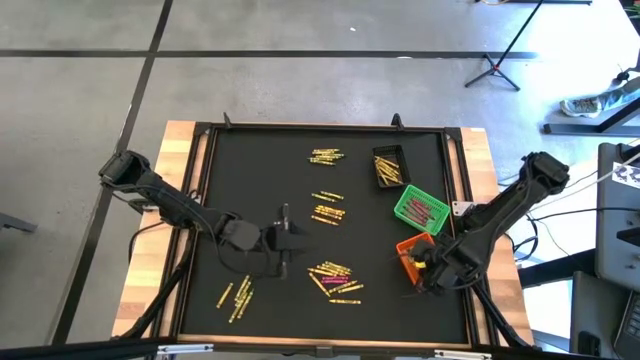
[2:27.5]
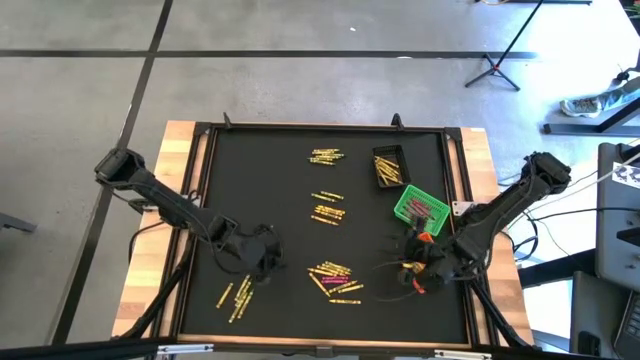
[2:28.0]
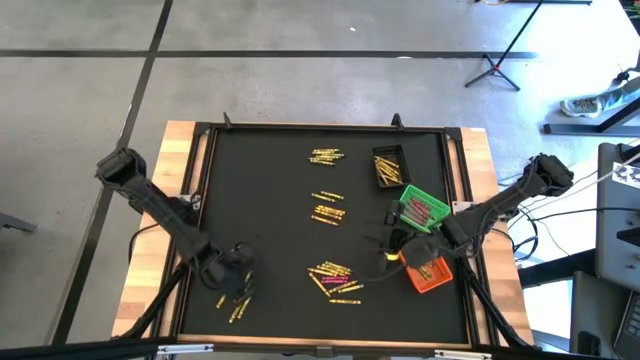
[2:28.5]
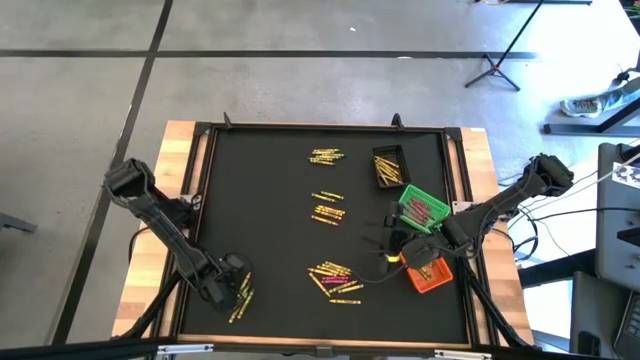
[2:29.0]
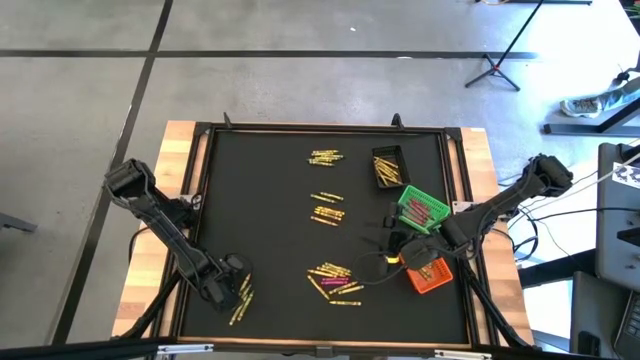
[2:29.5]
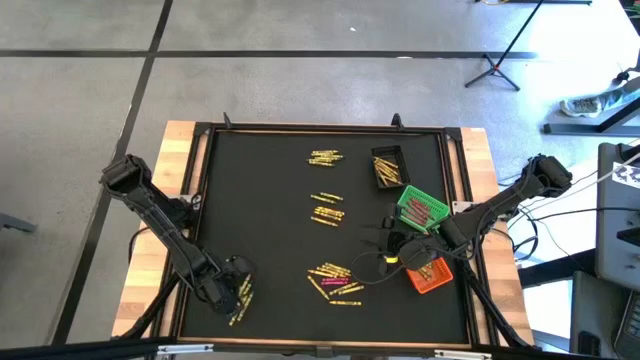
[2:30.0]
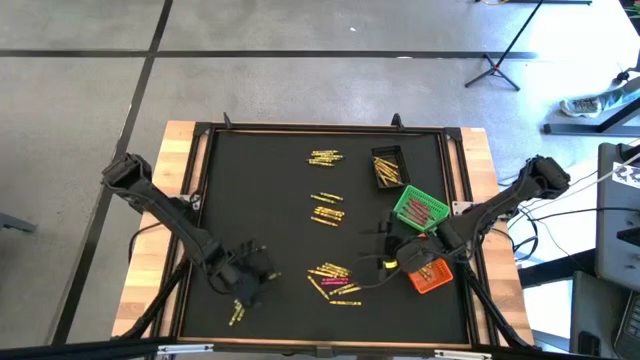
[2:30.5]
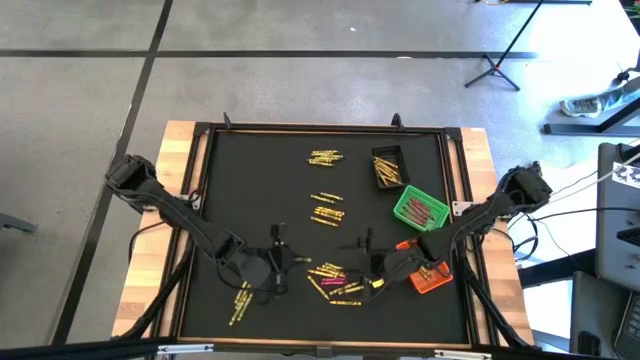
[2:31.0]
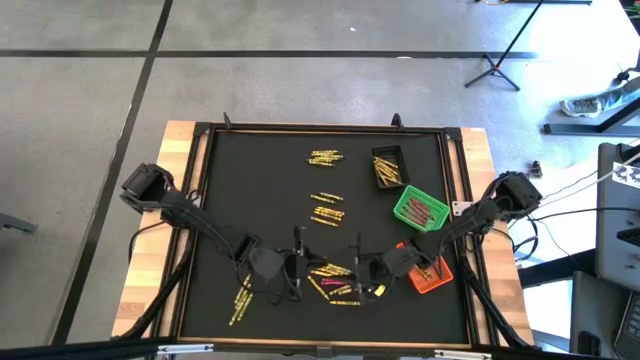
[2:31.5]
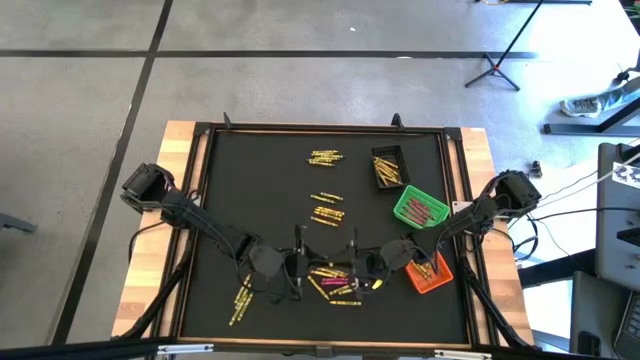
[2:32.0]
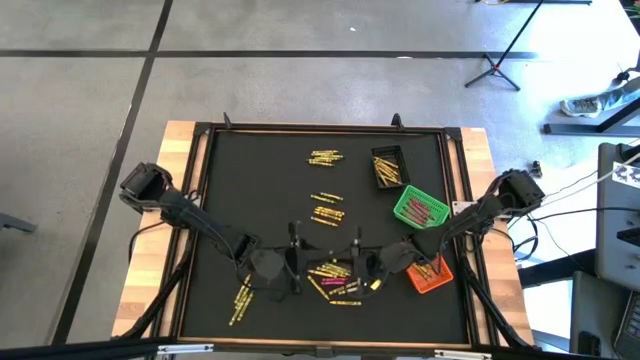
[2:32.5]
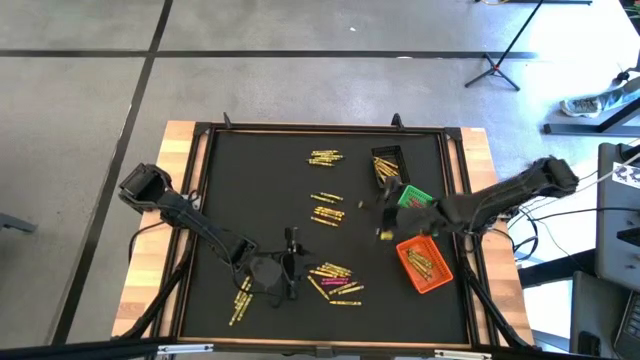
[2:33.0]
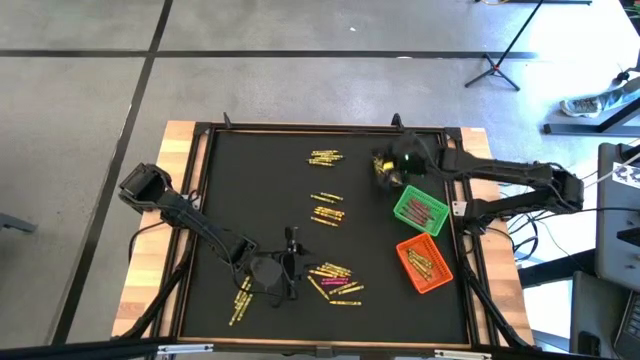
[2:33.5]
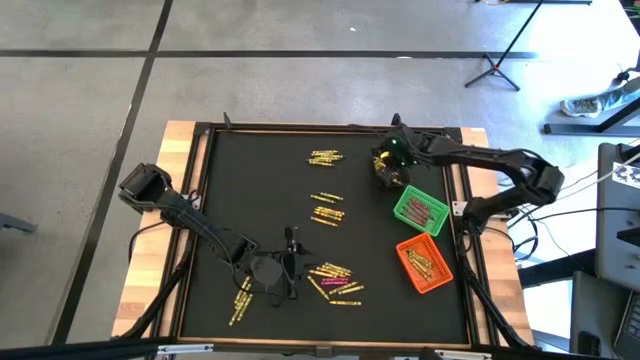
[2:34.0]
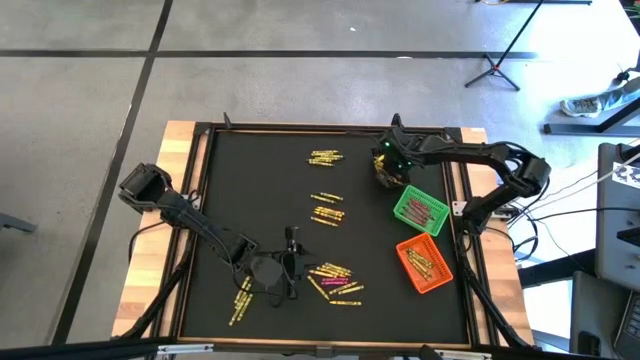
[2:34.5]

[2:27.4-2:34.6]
Task: Sort crayons
Put the yellow crayon into the black basket

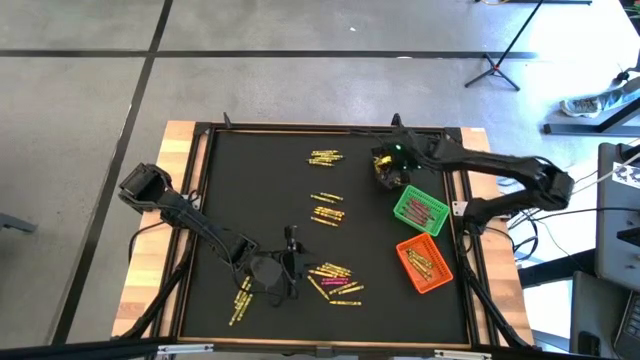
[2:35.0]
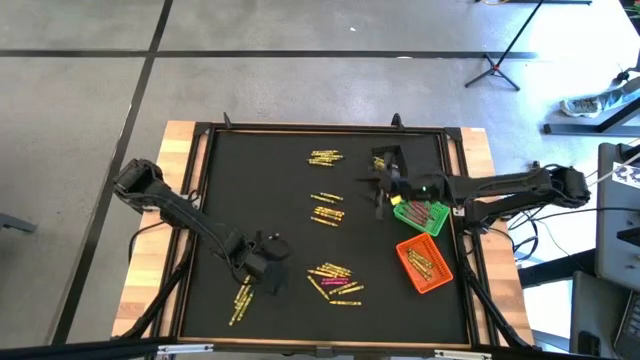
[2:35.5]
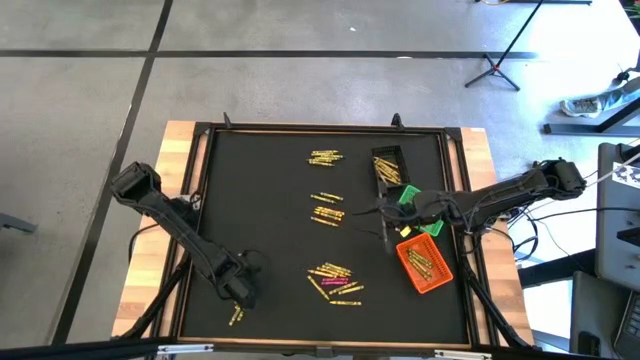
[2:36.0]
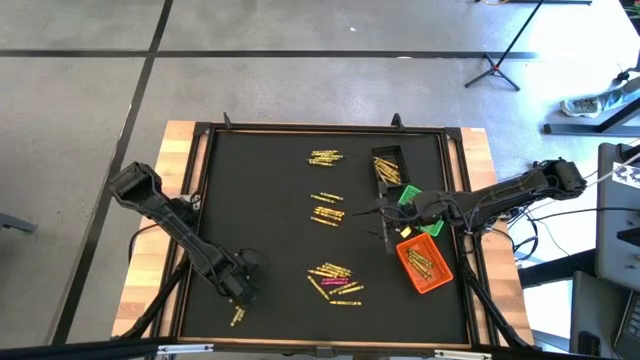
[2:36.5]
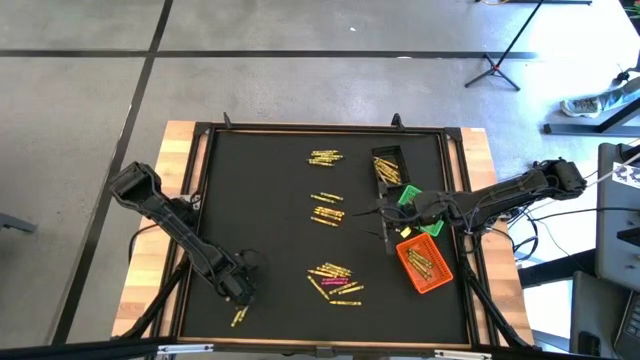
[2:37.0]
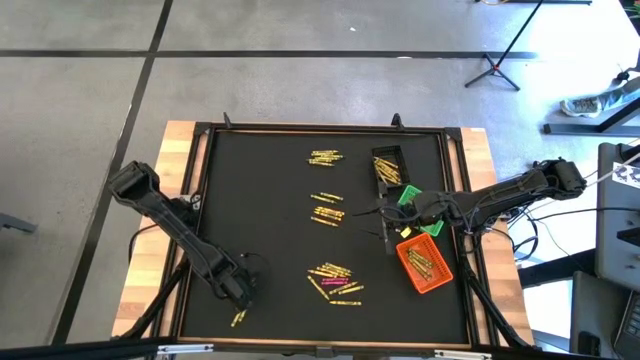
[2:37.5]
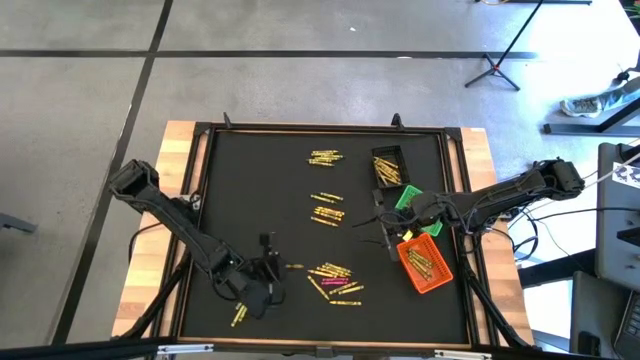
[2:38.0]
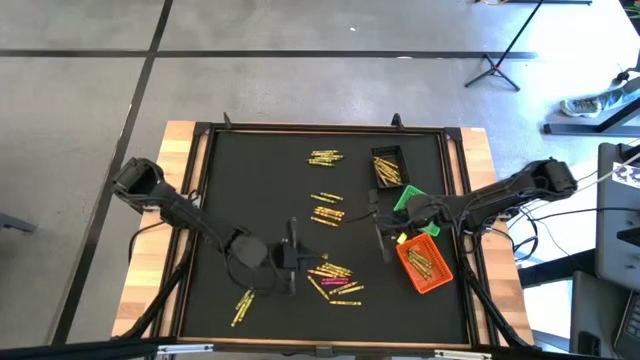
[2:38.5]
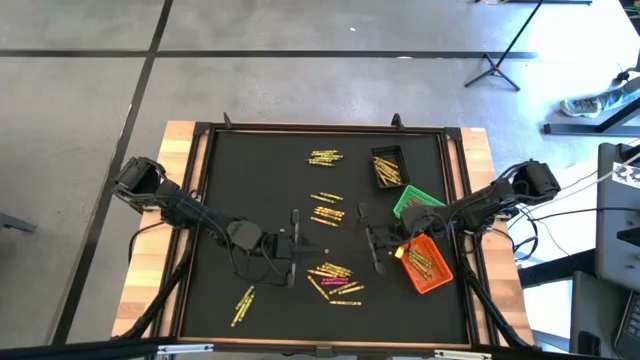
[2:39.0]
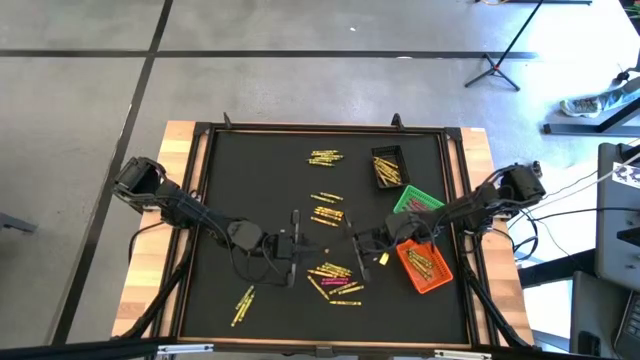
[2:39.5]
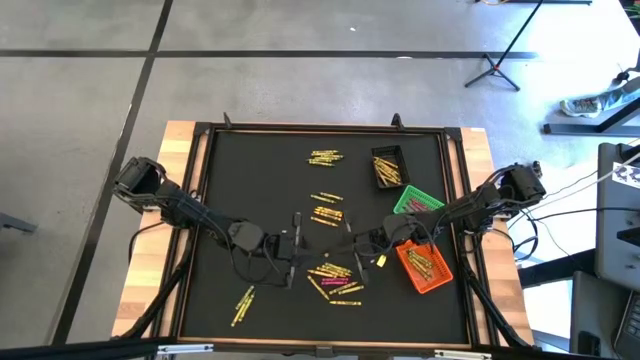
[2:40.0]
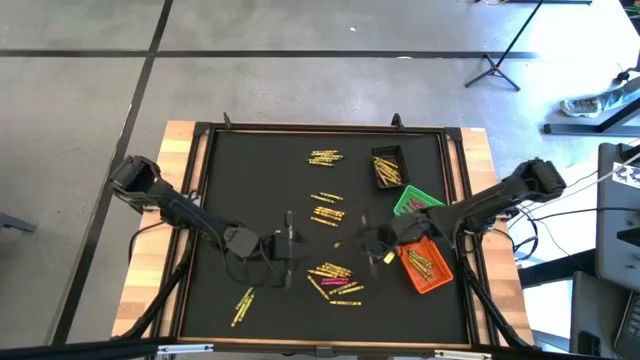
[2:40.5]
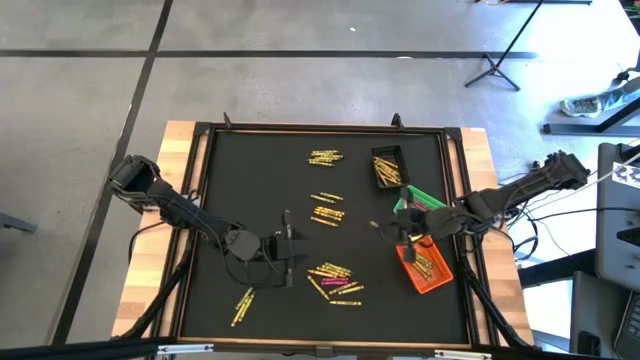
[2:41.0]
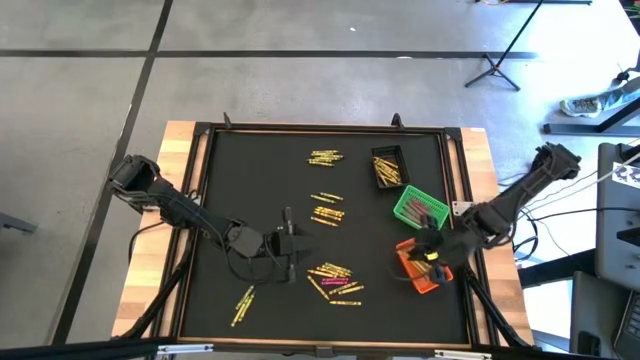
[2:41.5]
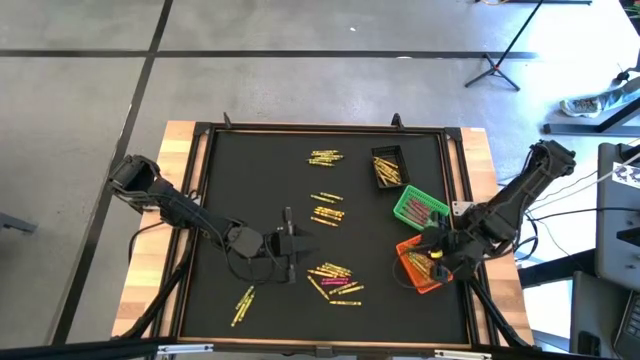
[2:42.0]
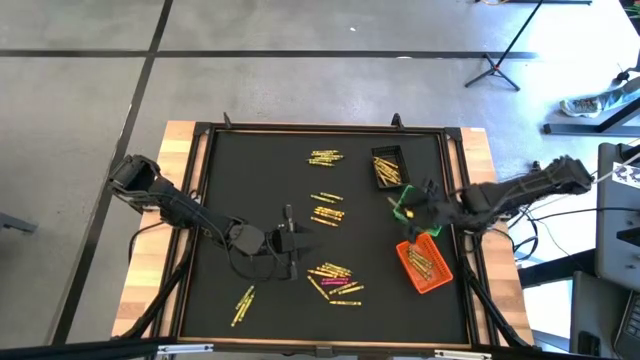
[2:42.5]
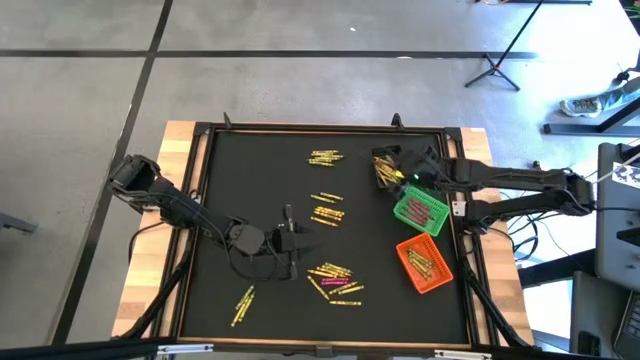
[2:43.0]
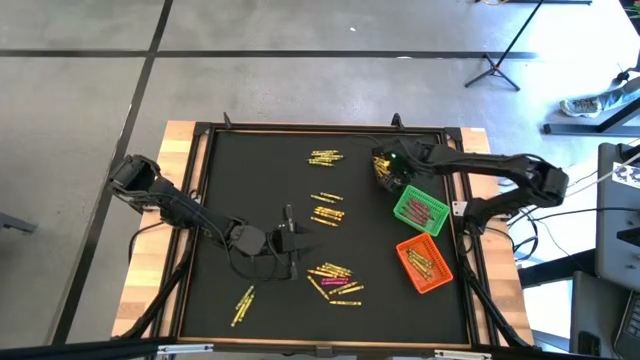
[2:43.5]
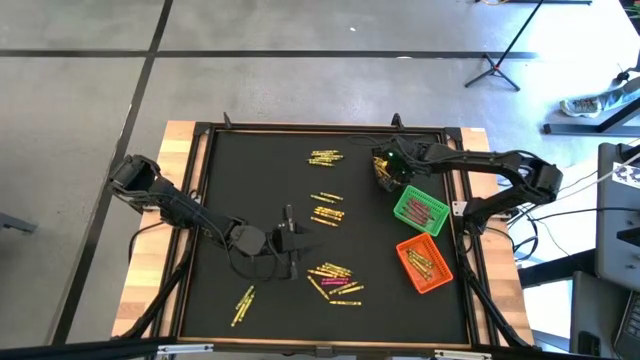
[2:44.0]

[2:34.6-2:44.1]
Put the yellow crayon into the black basket

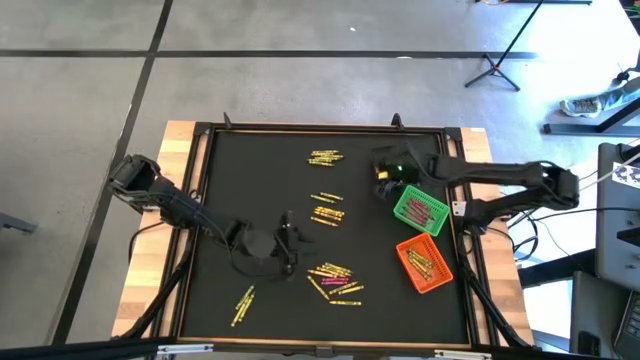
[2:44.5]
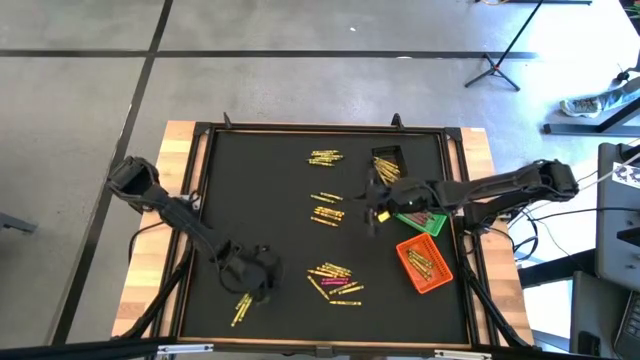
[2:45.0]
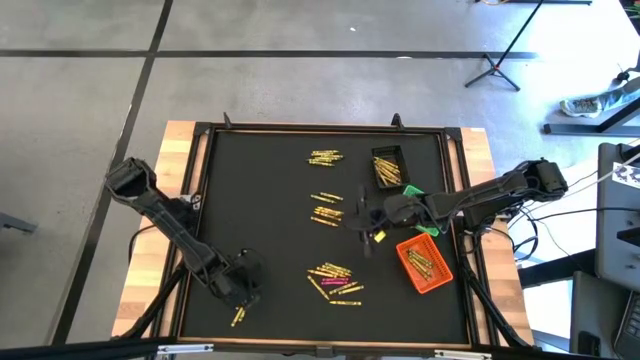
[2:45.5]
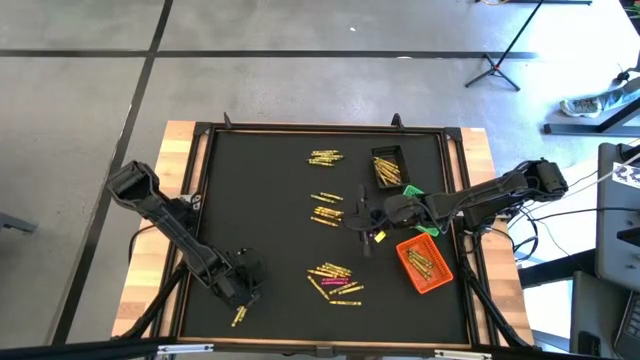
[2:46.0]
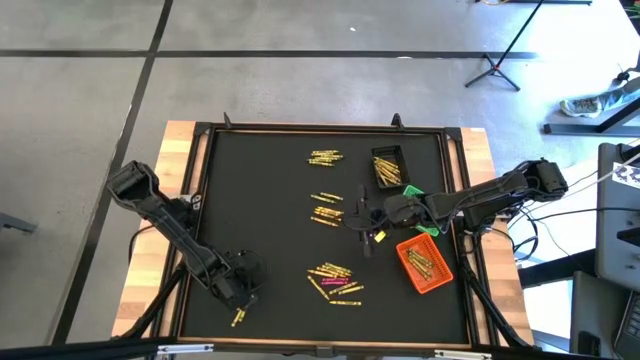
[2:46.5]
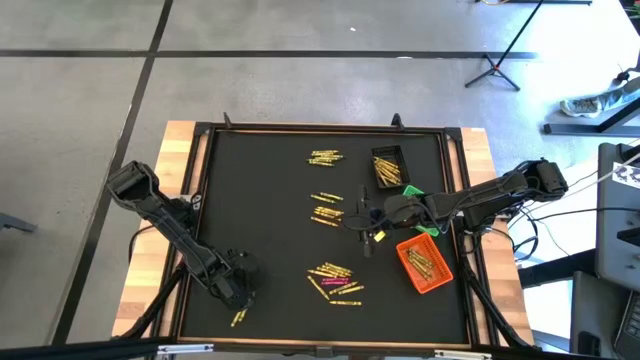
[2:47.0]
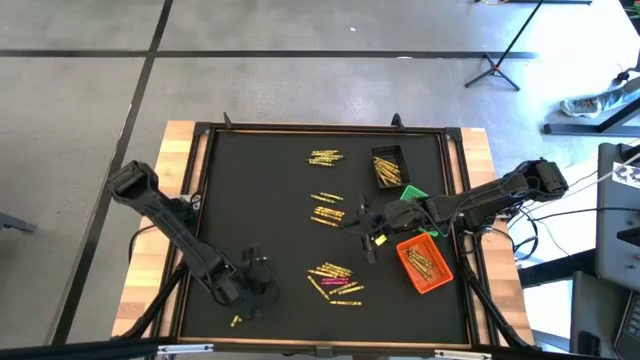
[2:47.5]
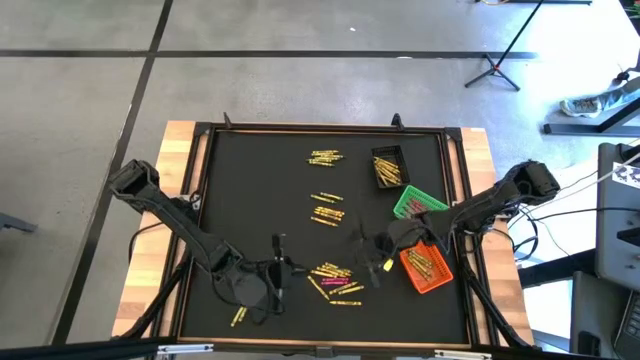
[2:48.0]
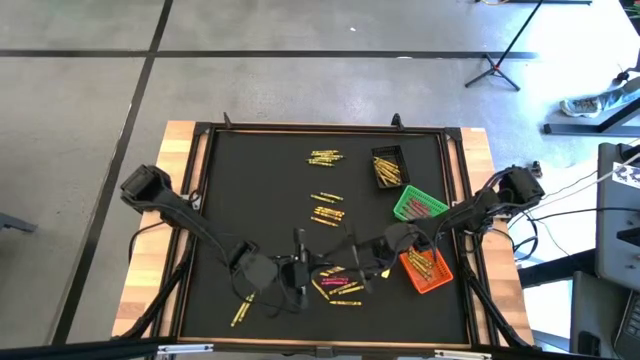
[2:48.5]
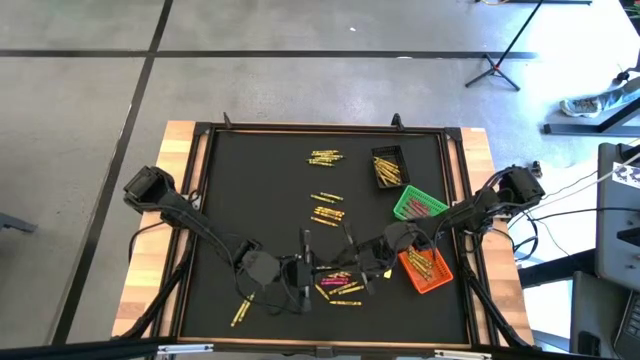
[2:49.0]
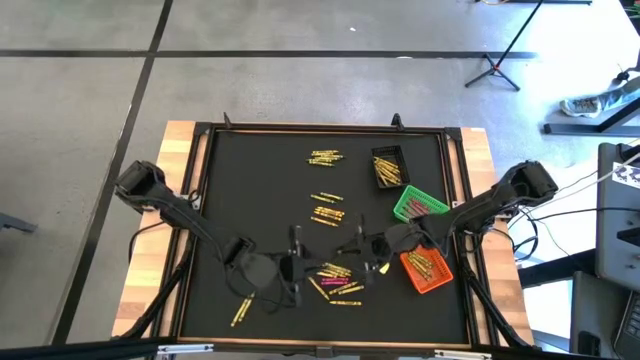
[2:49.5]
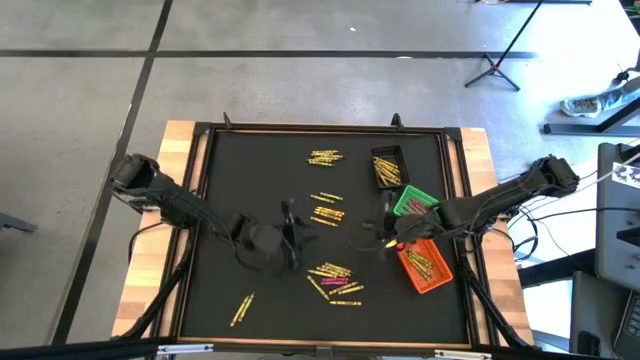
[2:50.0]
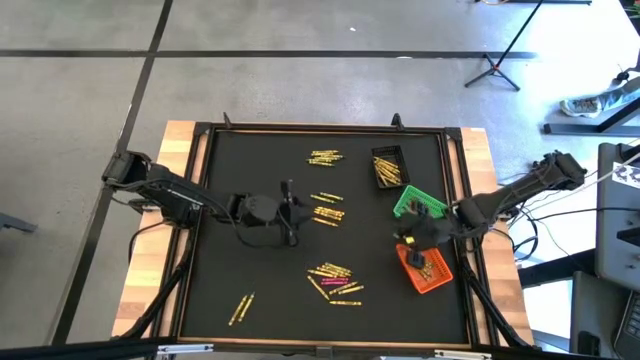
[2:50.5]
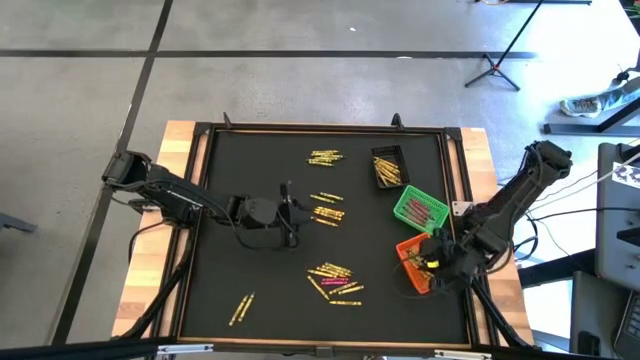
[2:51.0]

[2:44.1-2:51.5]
Put the green crayon into the orange basket
